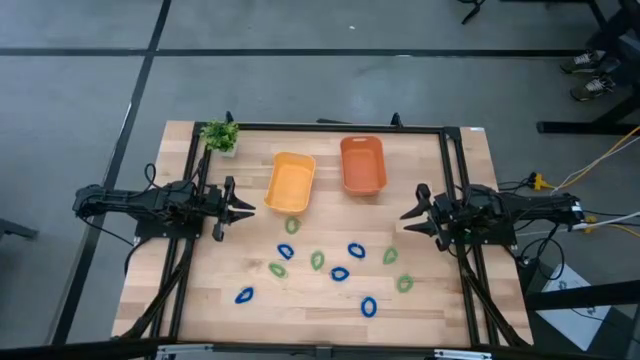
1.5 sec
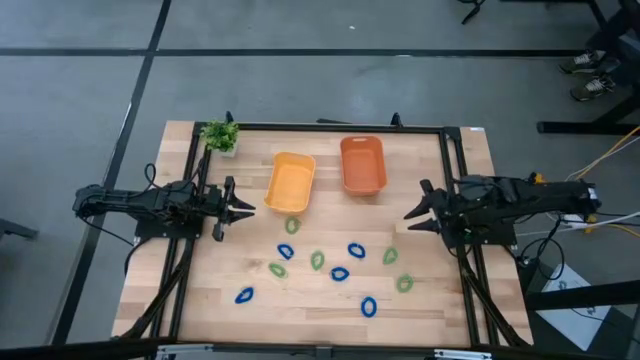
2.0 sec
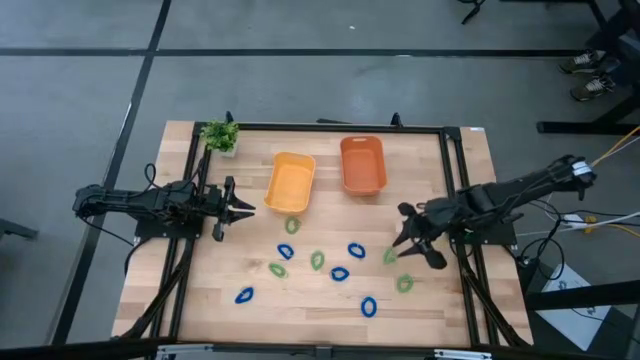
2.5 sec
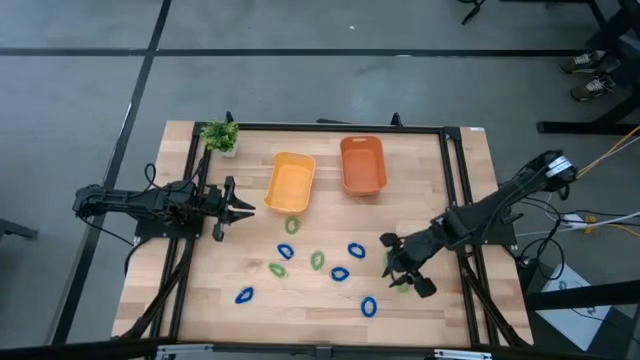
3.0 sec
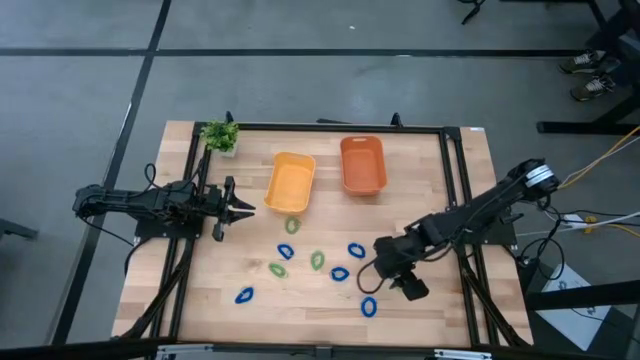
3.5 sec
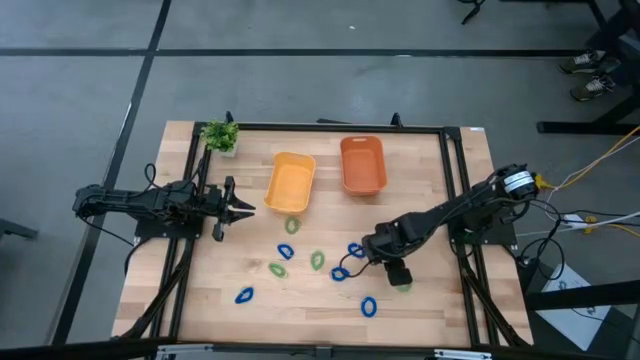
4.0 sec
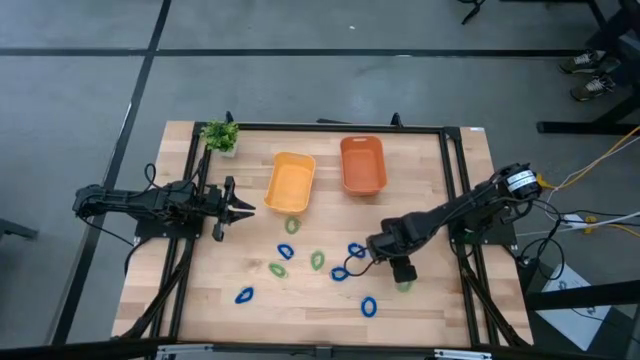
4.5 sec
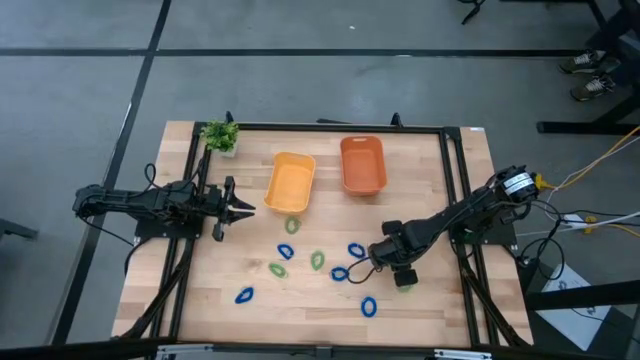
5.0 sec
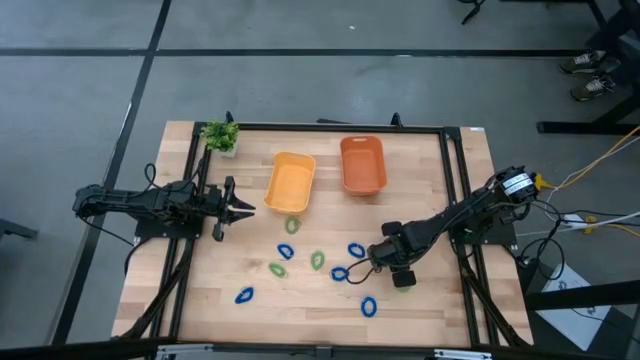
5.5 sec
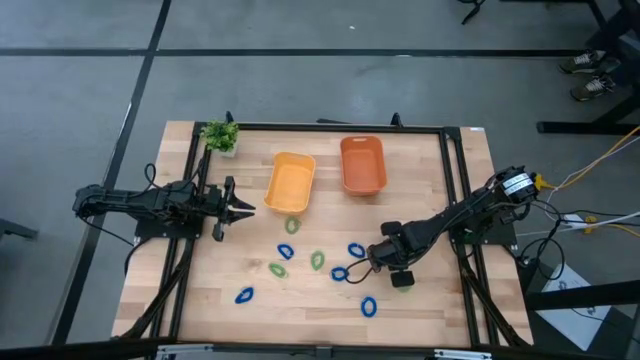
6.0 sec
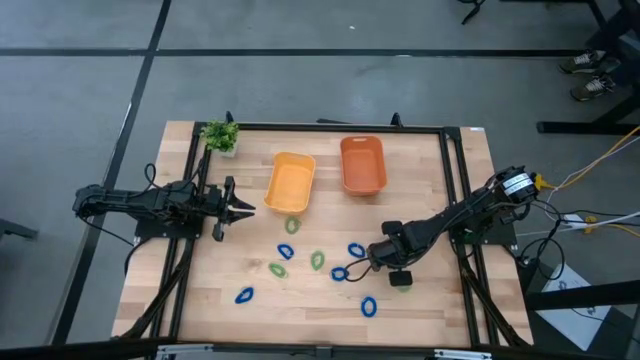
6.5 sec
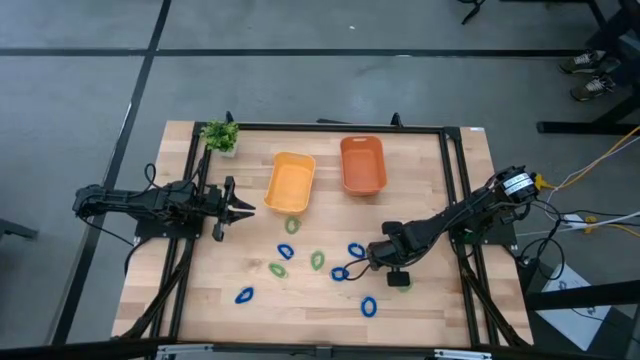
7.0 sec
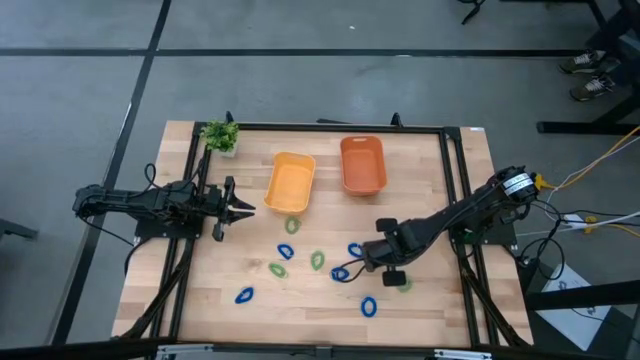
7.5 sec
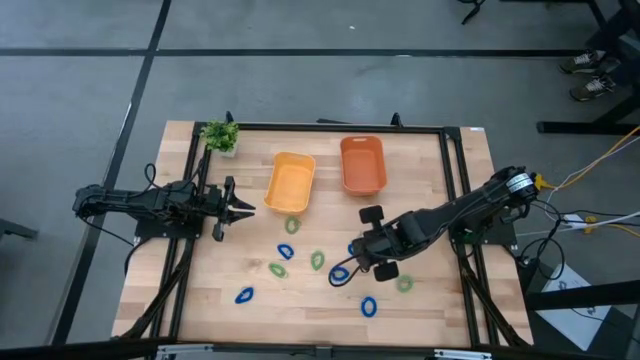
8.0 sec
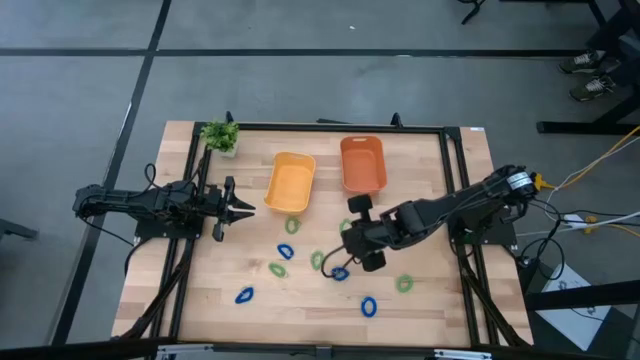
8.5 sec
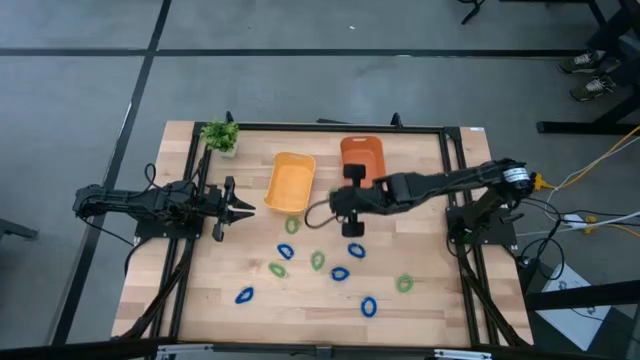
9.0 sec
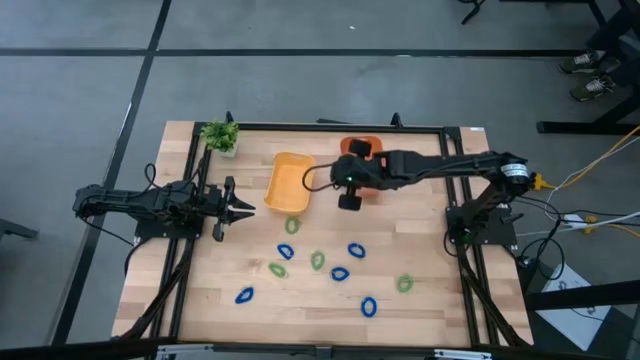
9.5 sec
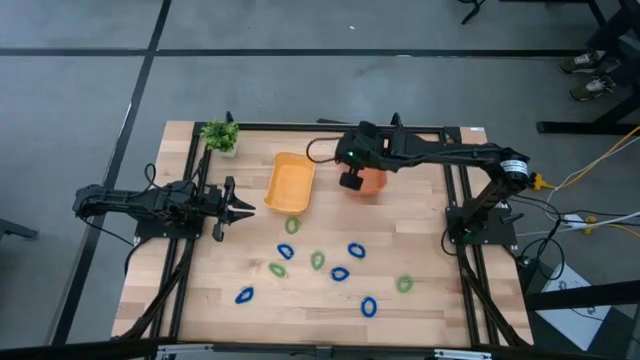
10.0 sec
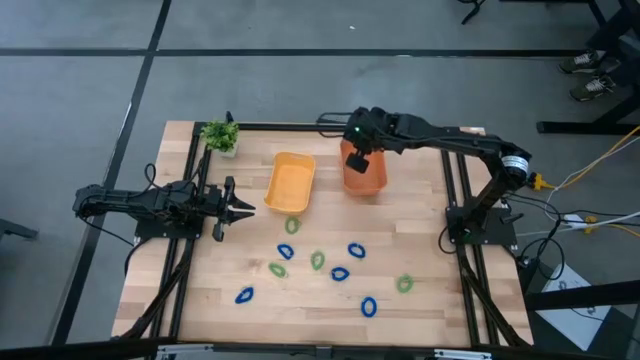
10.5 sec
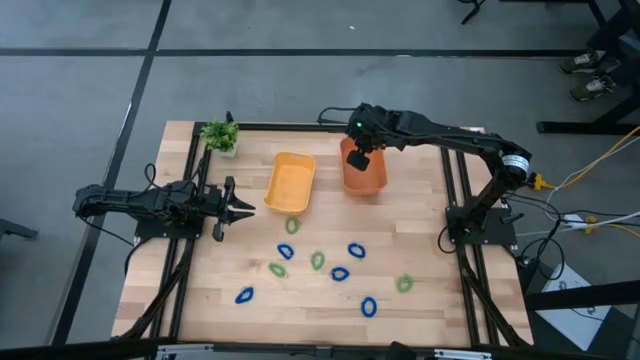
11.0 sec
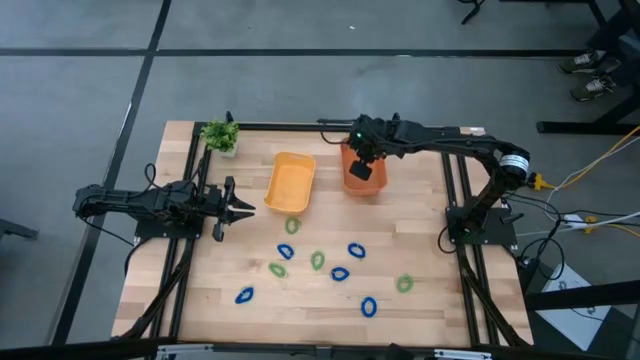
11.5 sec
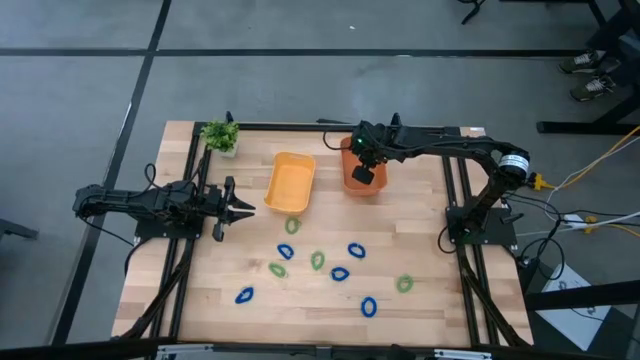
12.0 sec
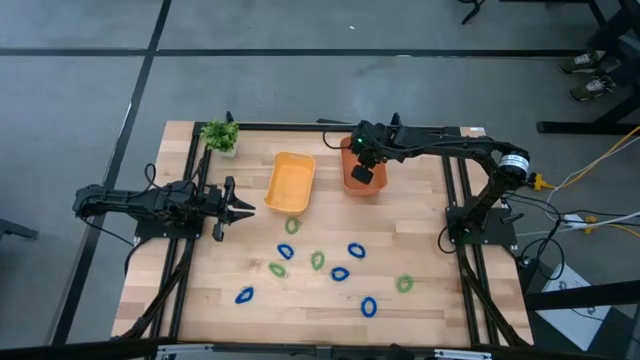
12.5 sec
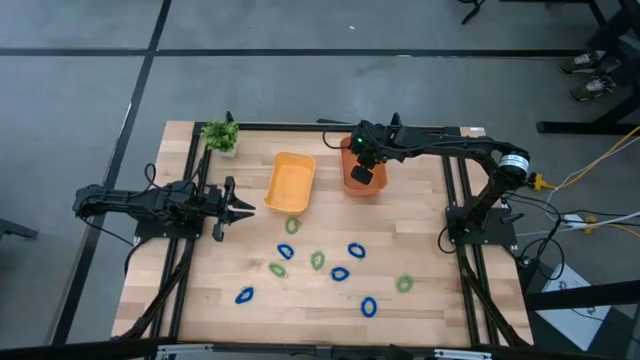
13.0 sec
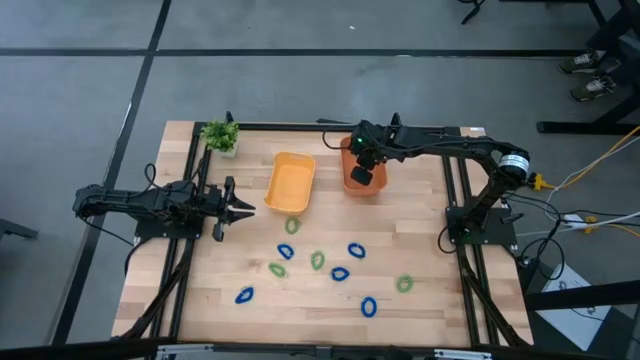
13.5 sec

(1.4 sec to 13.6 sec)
Task: Sort items
Put the green keychain into the orange bin

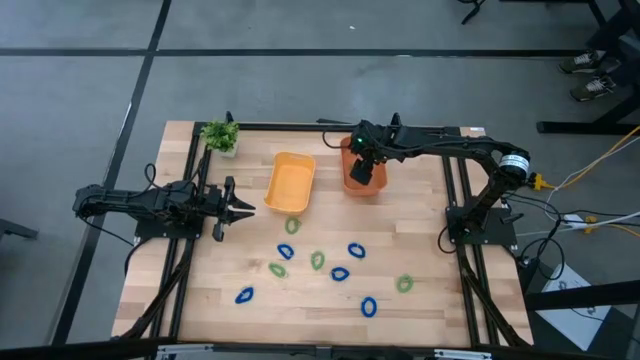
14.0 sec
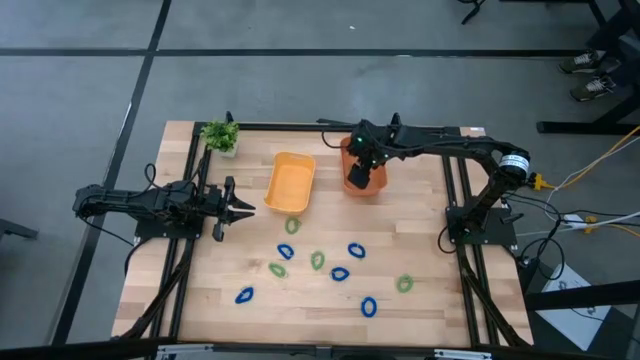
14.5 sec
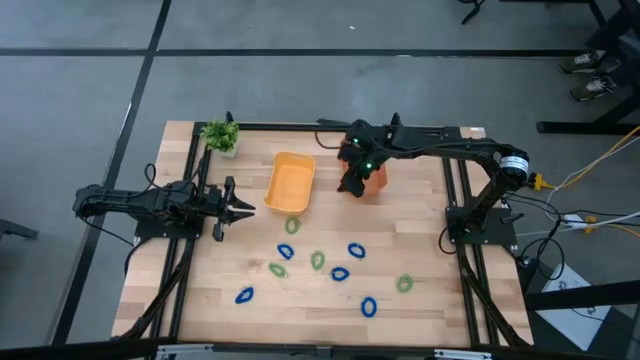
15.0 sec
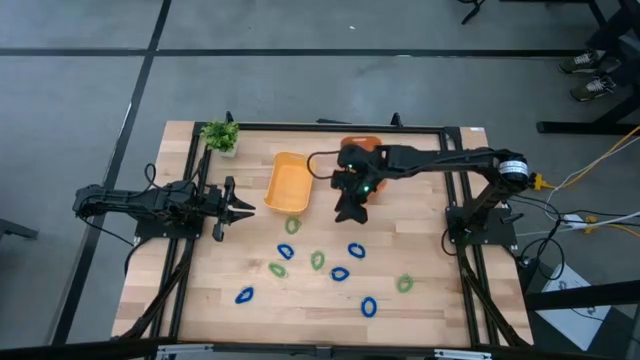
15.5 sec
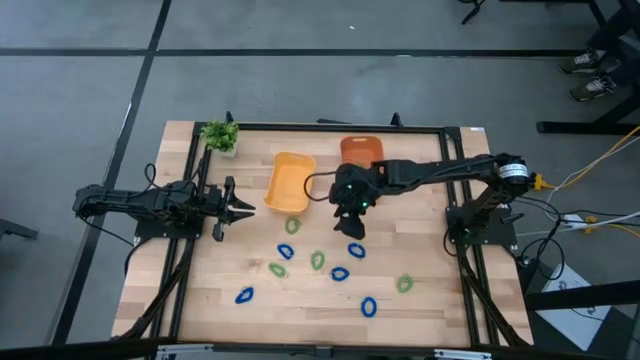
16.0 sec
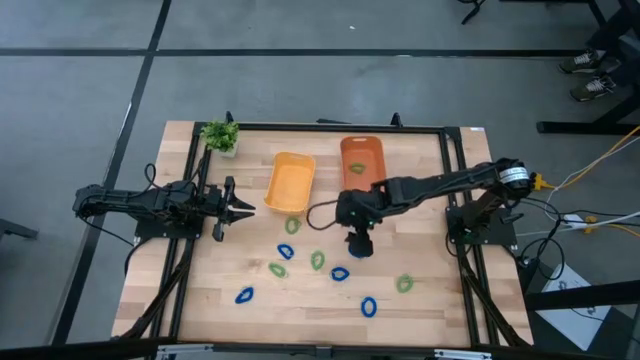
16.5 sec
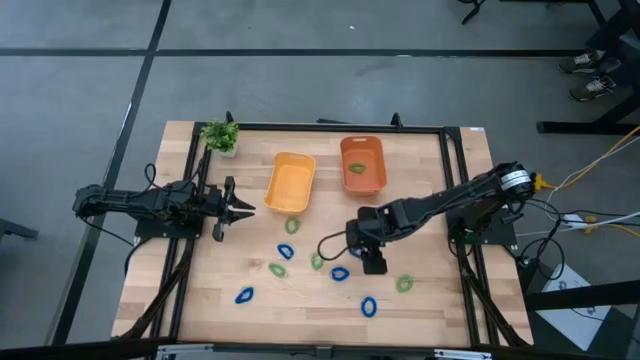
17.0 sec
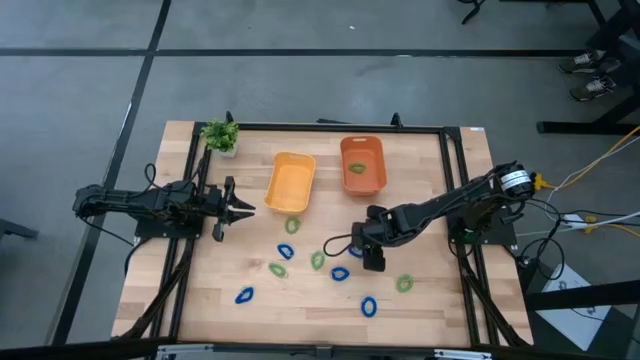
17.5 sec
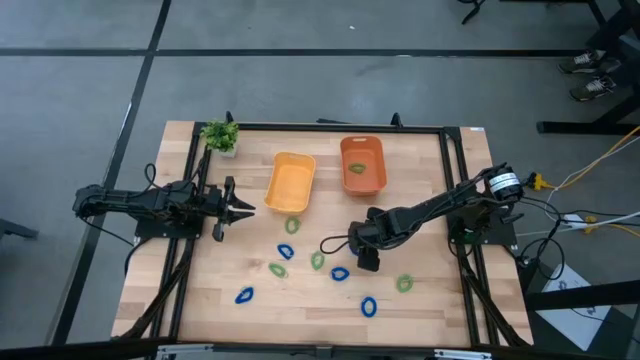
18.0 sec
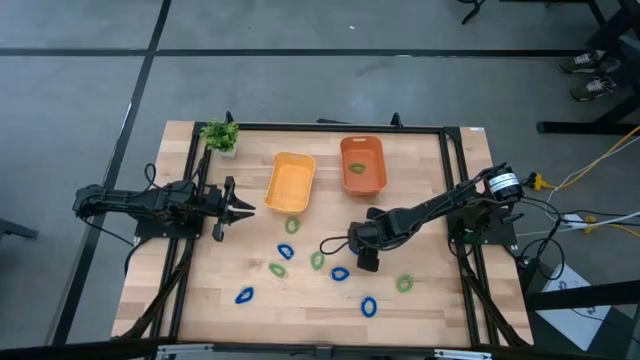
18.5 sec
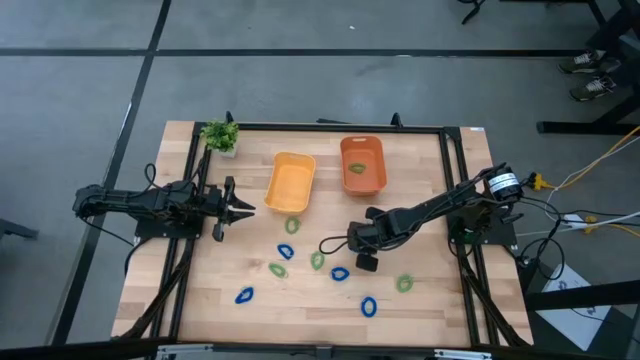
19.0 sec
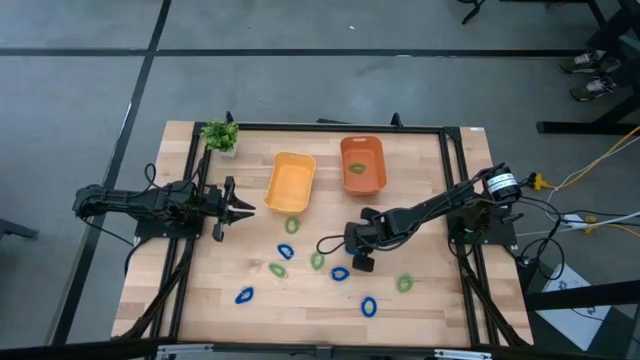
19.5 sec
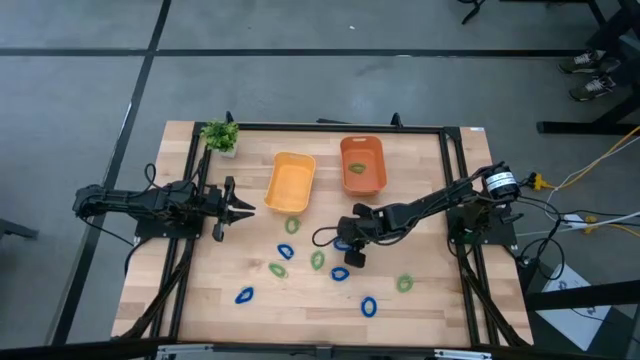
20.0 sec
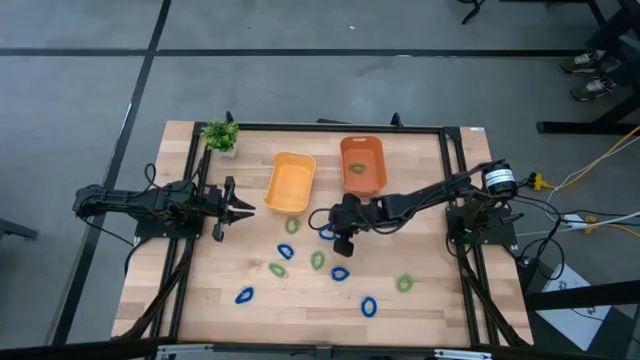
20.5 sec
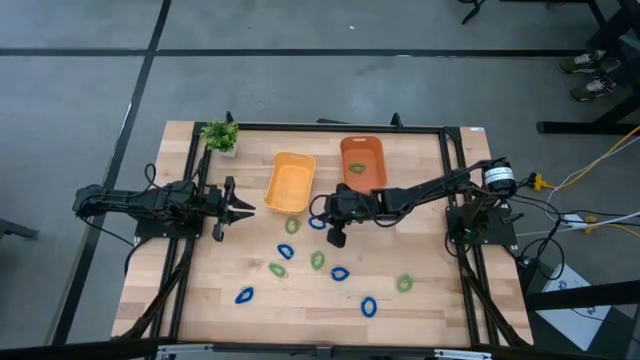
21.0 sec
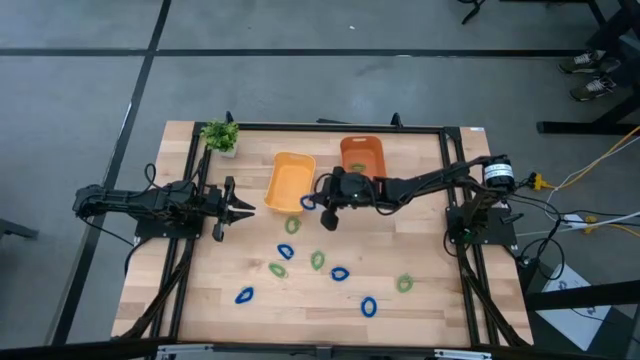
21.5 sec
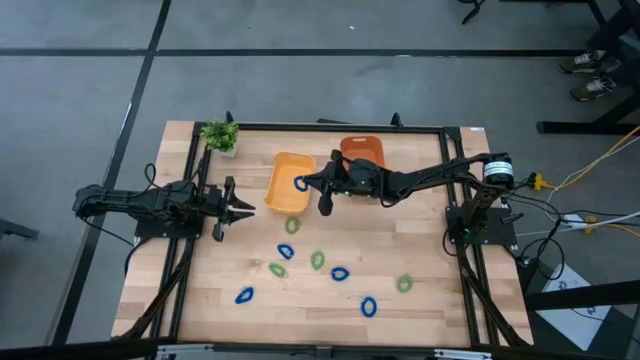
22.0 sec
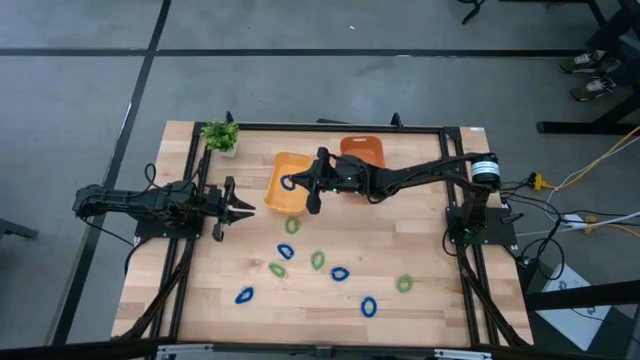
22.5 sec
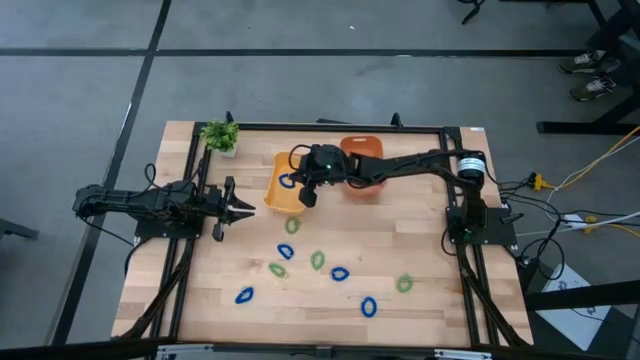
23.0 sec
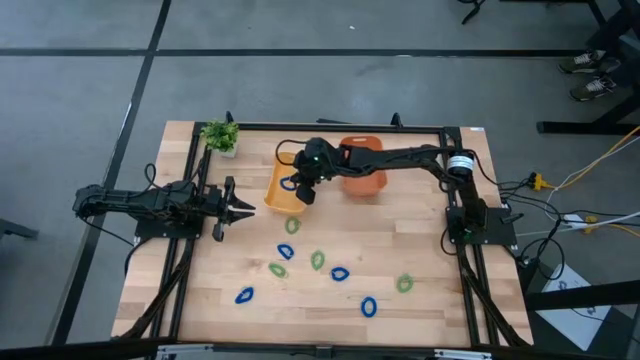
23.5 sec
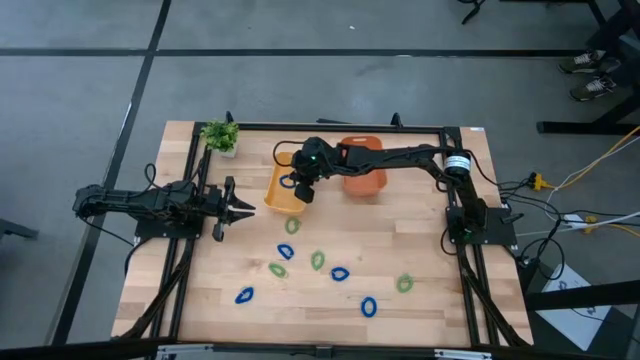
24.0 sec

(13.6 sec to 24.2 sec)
Put the blue keychain into the yellow bin
